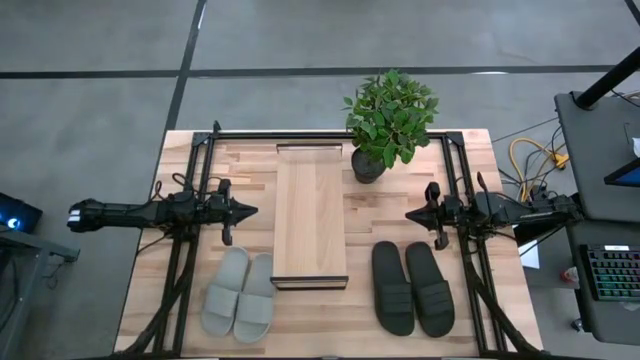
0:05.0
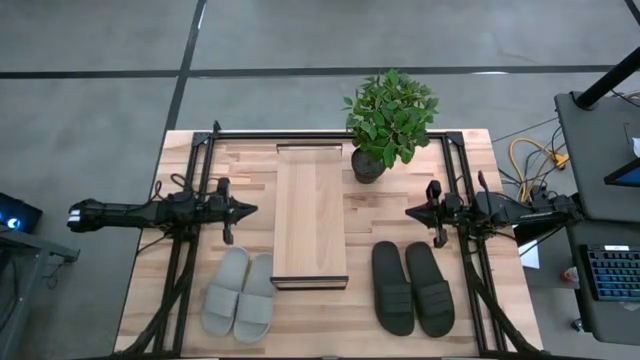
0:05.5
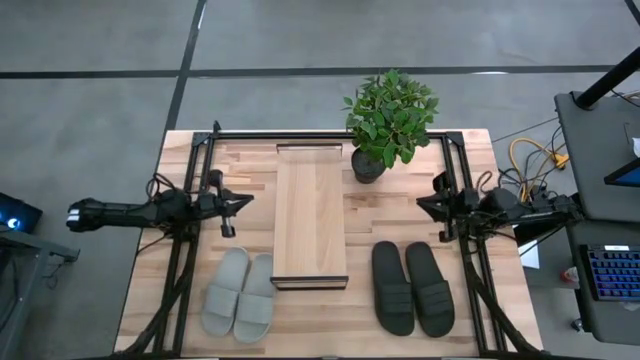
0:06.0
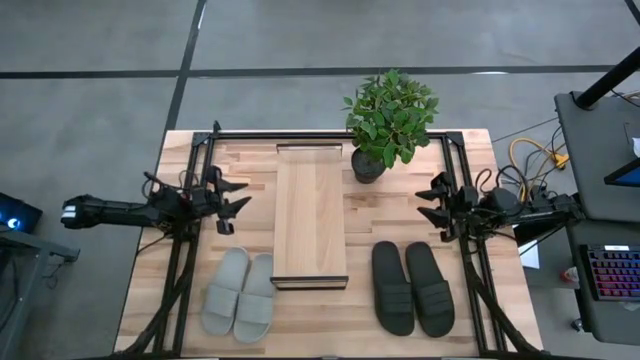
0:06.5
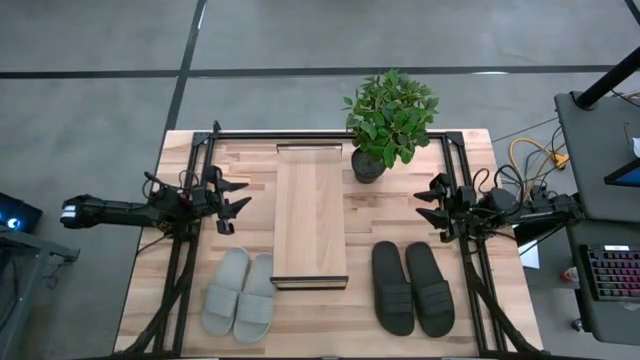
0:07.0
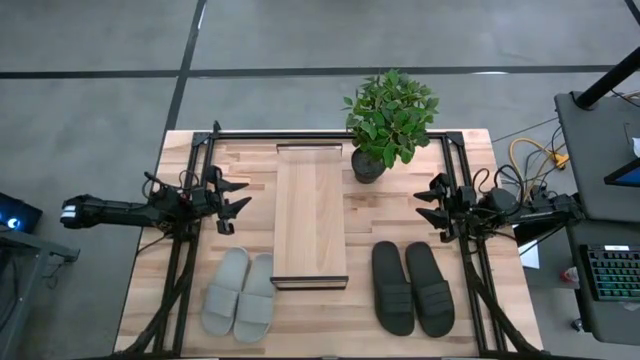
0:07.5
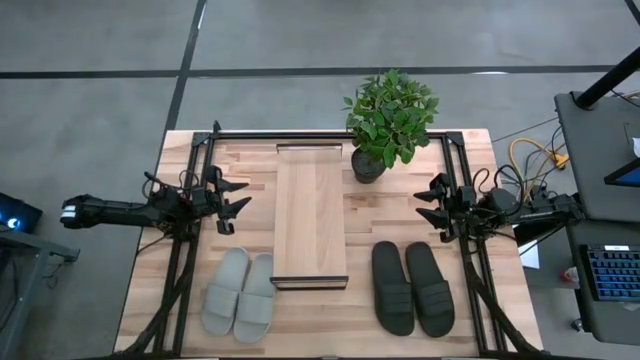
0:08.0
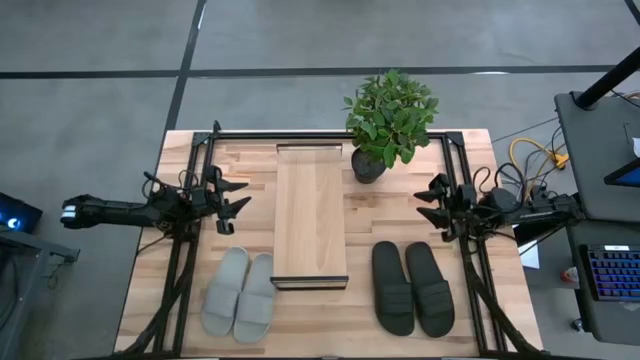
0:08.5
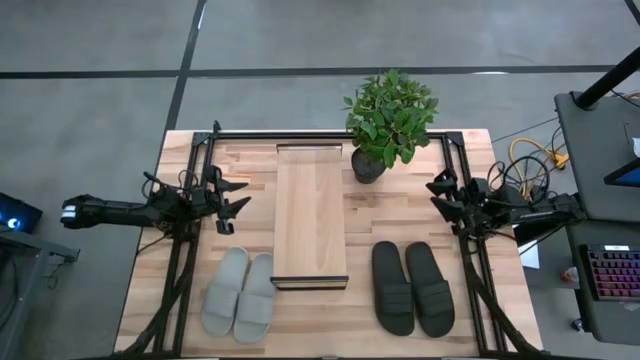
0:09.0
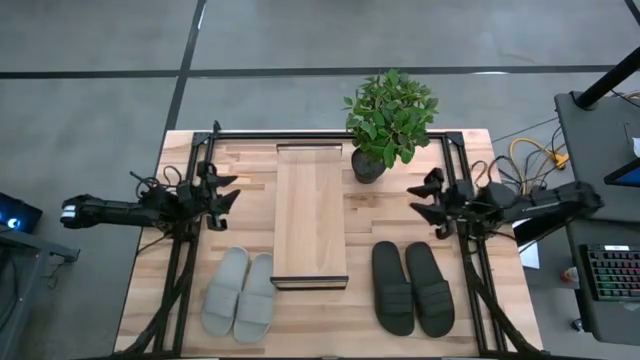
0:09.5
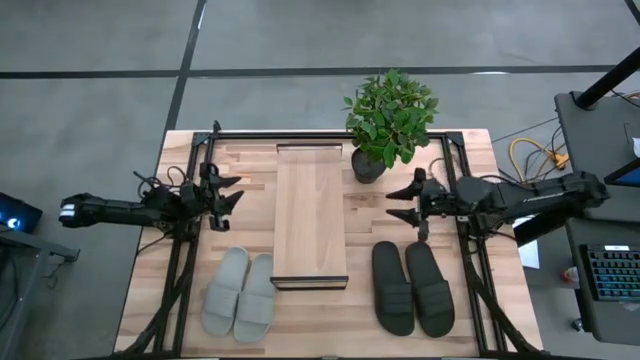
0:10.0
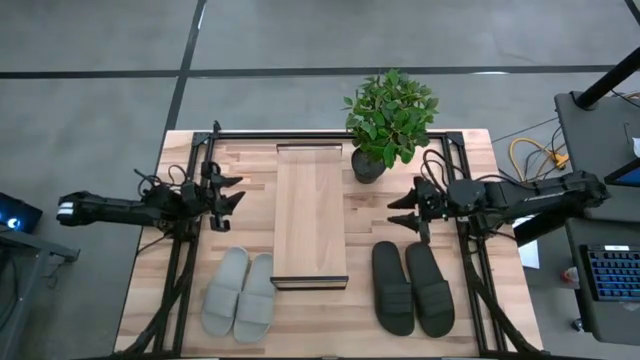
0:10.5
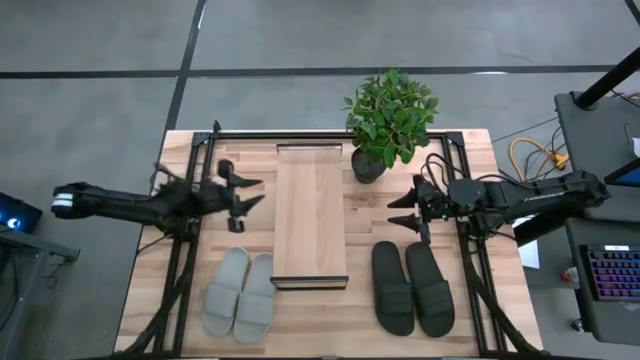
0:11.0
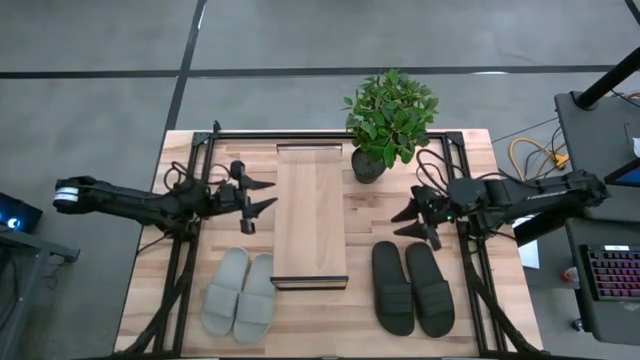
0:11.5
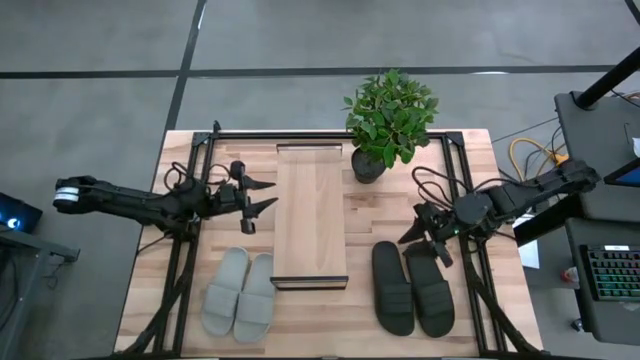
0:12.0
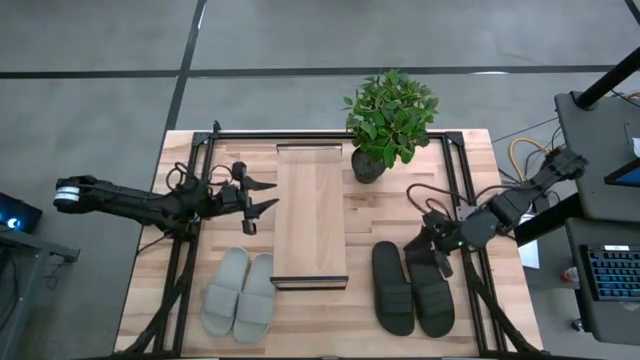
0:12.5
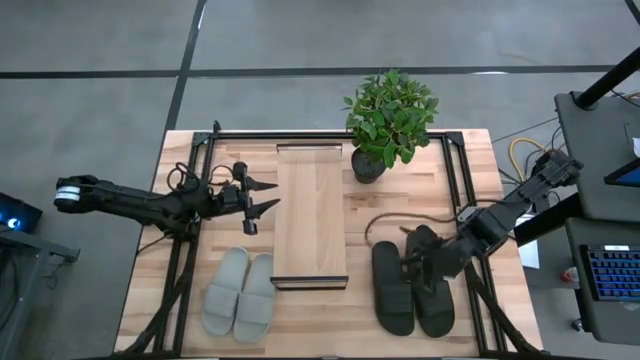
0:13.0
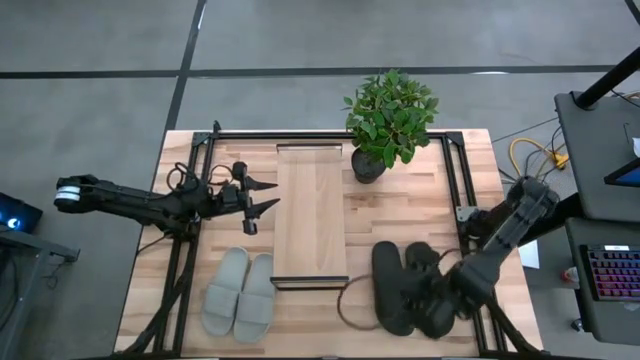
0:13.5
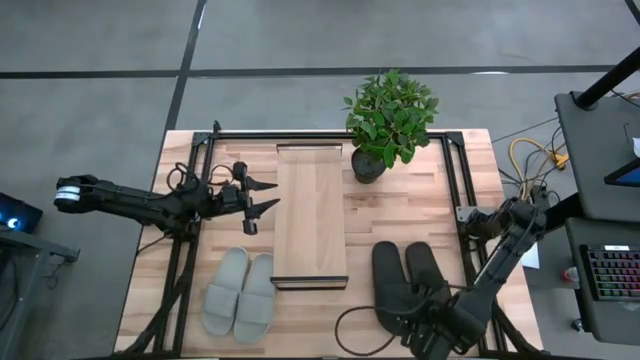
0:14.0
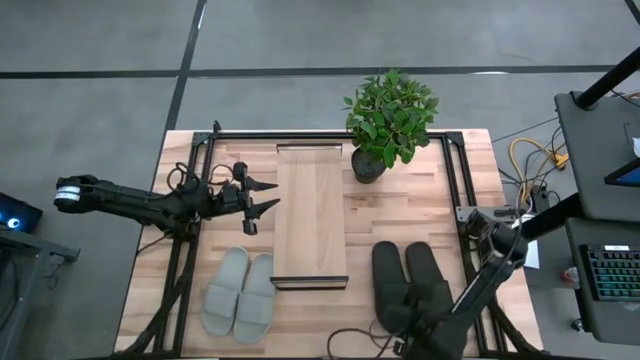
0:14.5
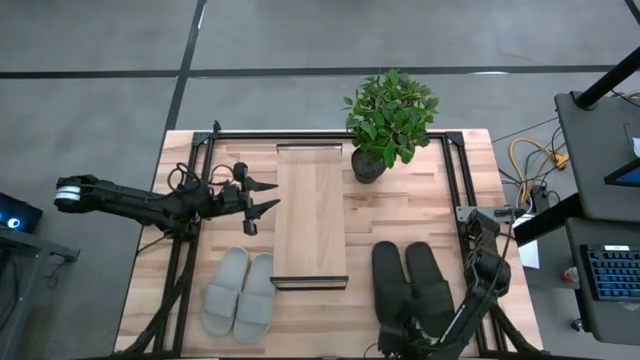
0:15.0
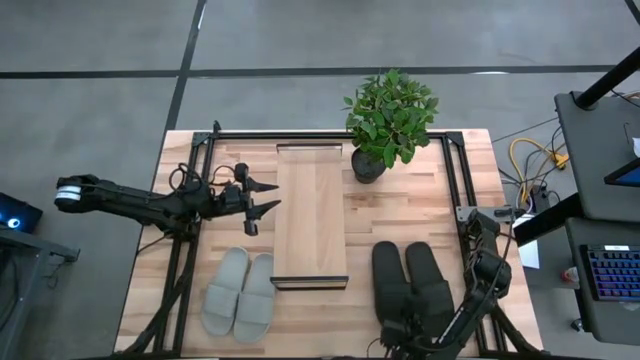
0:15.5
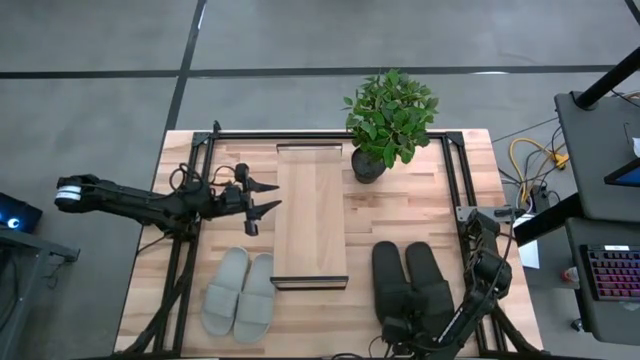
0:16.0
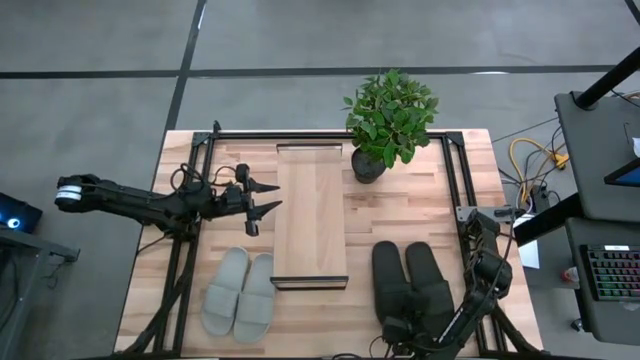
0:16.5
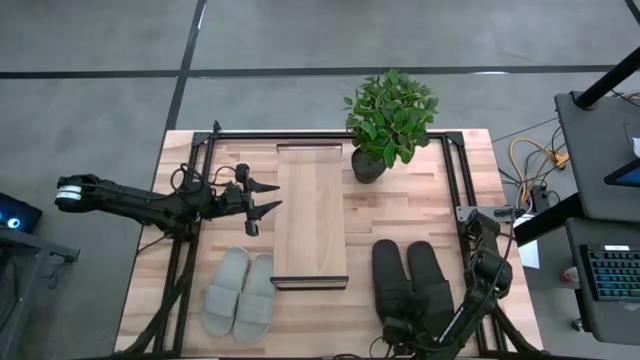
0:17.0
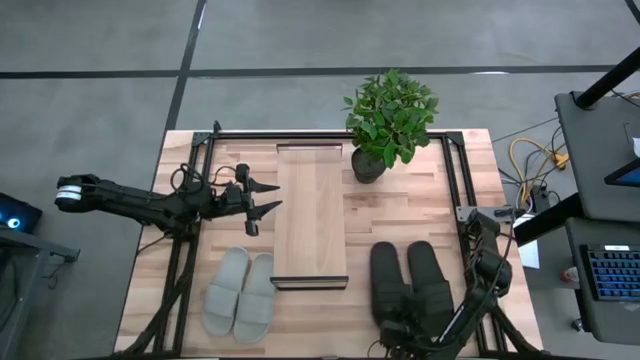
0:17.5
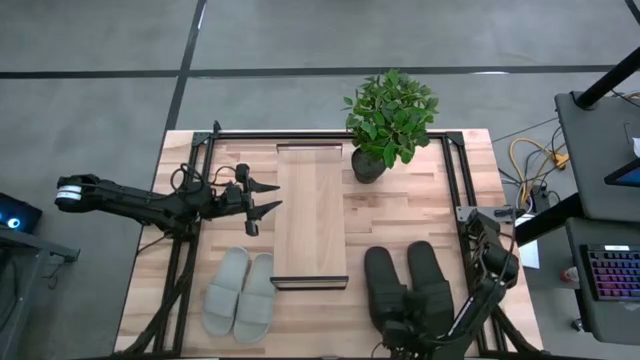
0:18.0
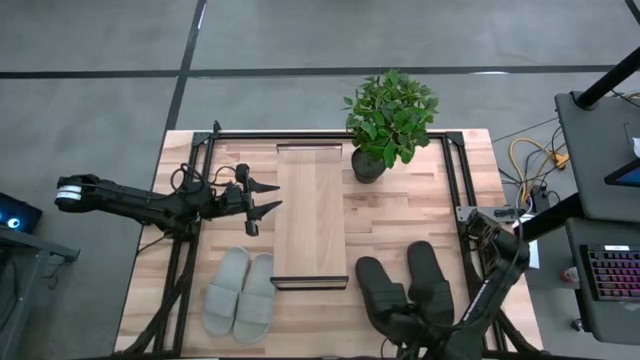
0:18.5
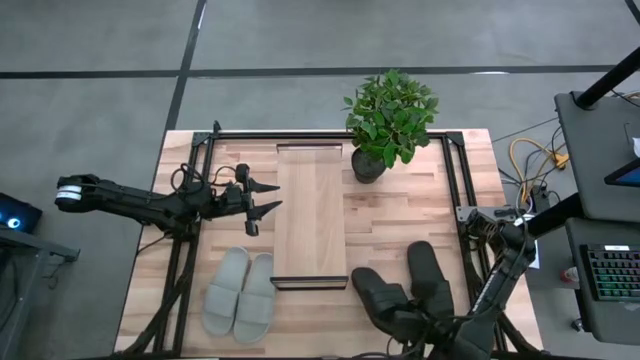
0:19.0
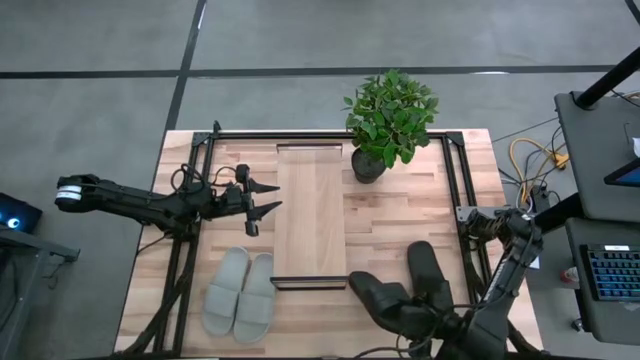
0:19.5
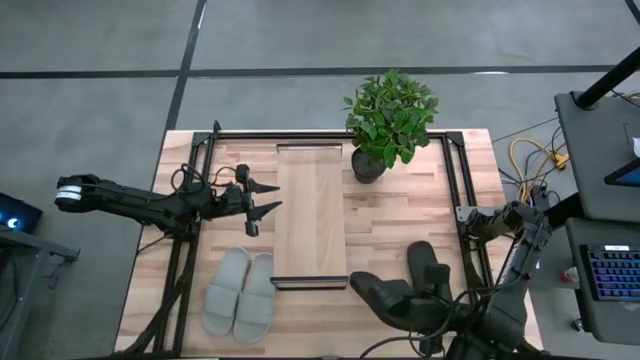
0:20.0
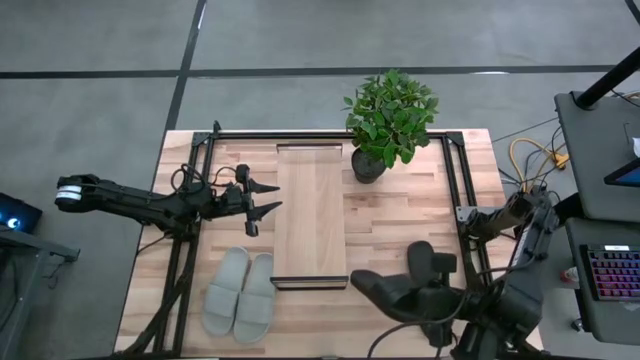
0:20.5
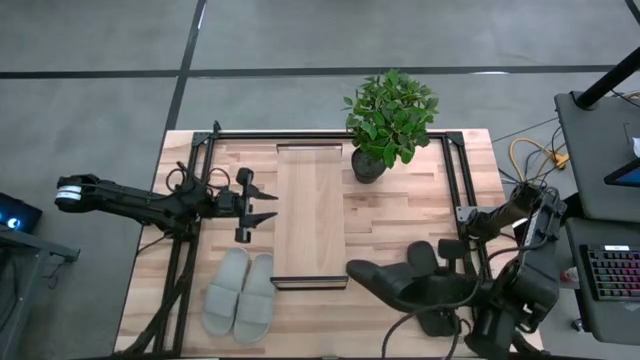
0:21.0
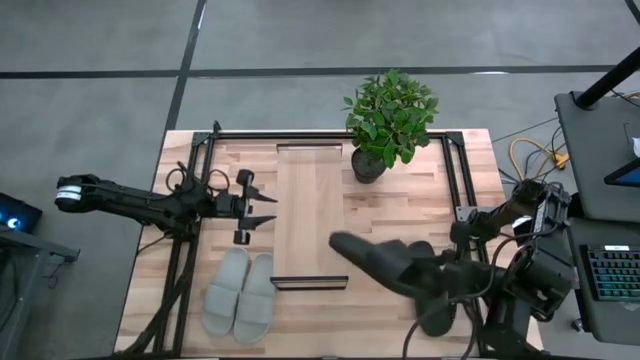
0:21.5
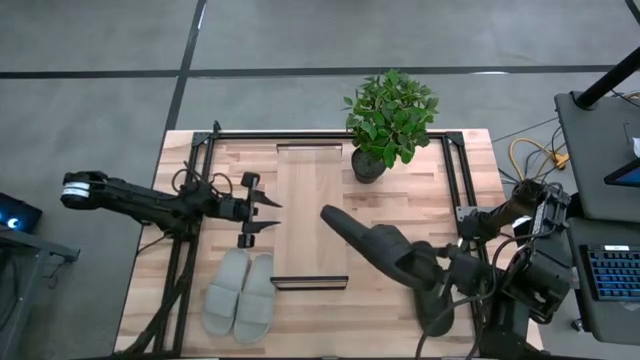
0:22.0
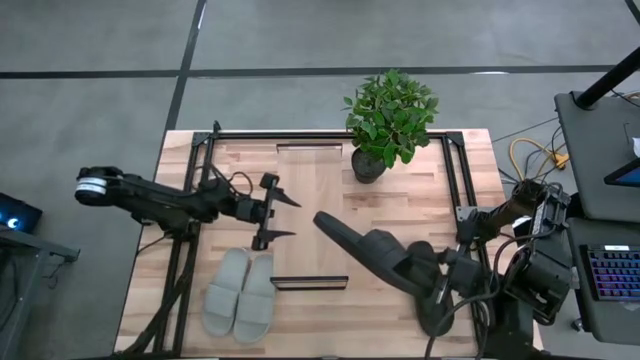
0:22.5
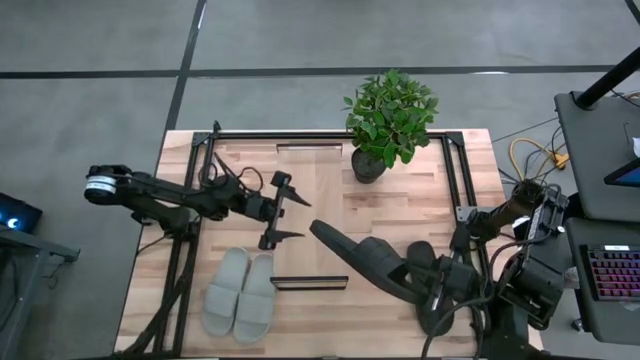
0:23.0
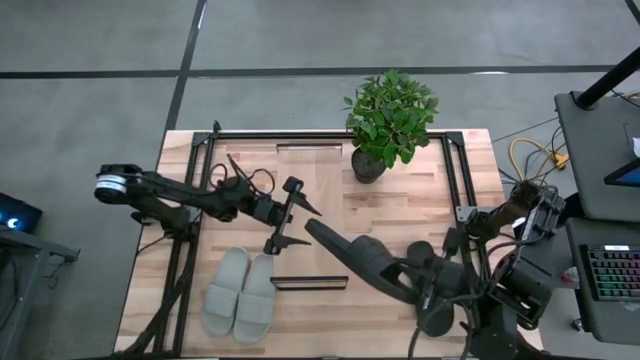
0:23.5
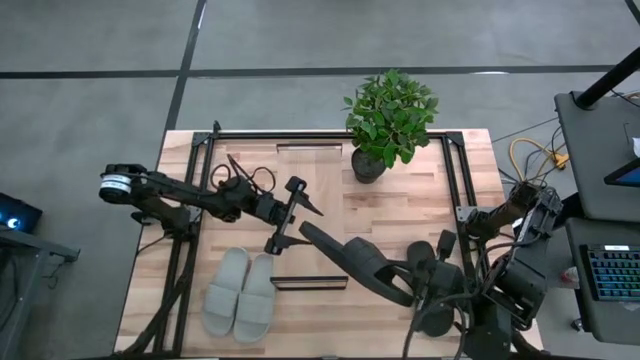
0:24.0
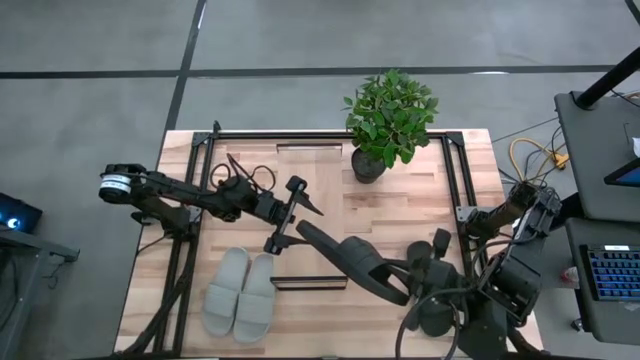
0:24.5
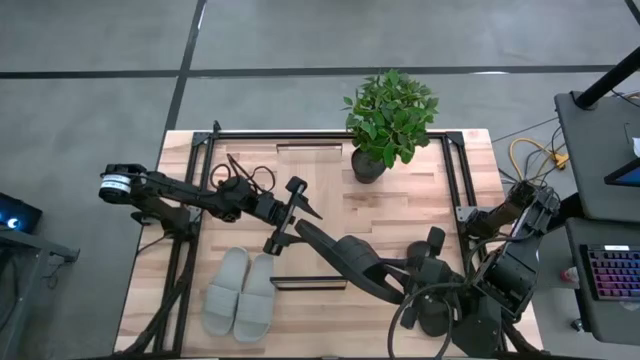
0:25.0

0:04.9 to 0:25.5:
Task: Pick and place slides into the shelf
Put the left black slipper on the shelf
